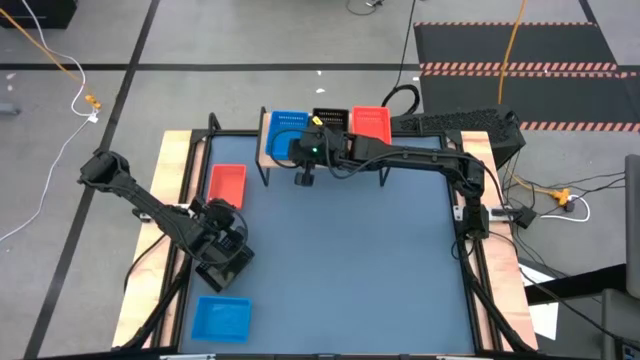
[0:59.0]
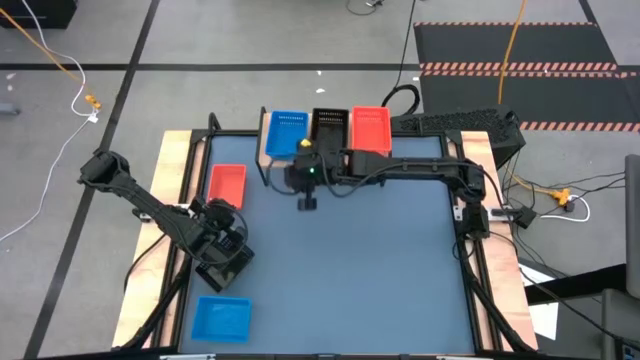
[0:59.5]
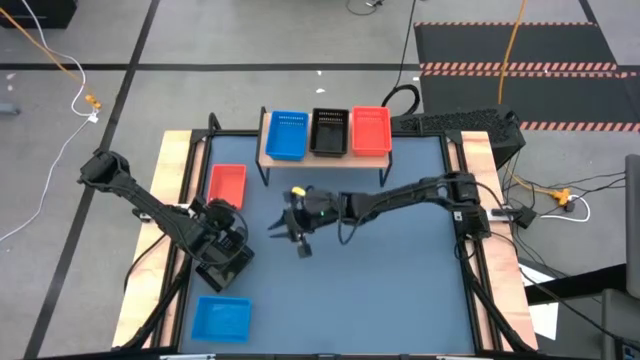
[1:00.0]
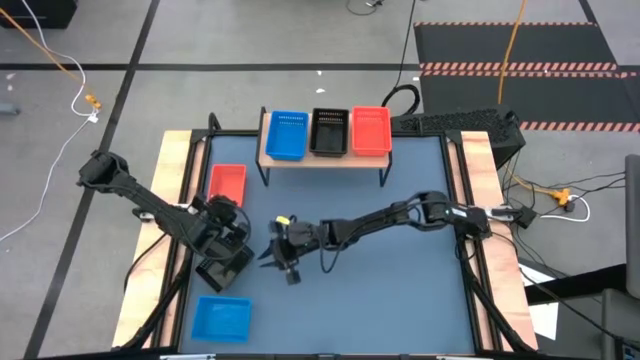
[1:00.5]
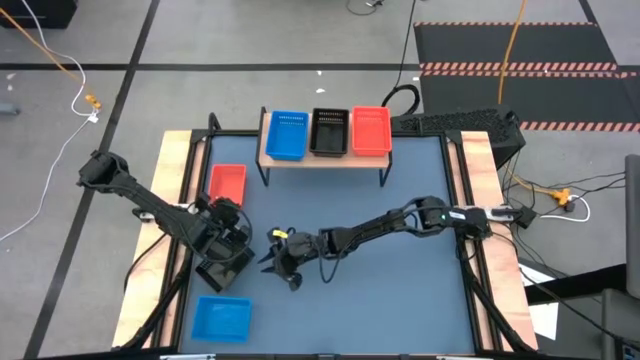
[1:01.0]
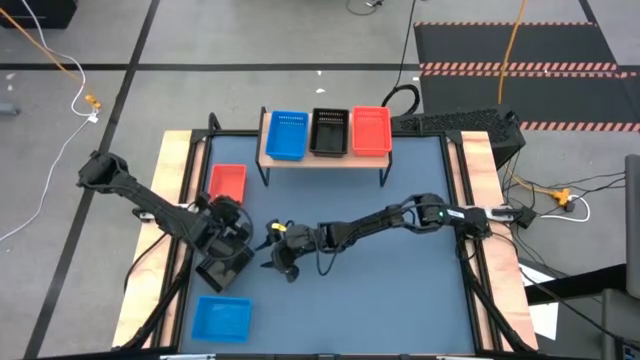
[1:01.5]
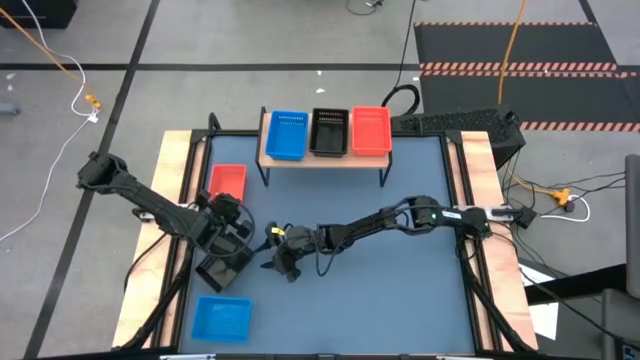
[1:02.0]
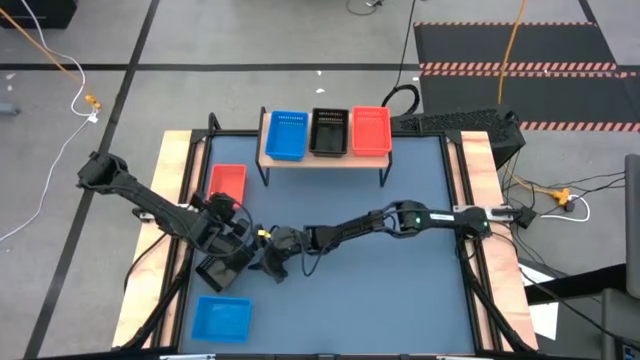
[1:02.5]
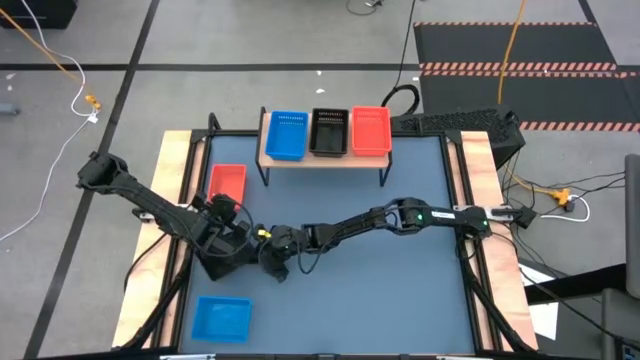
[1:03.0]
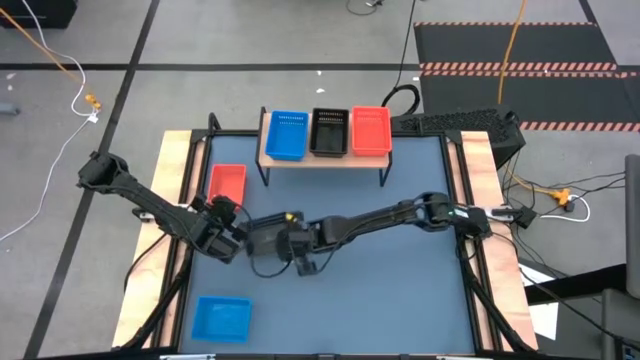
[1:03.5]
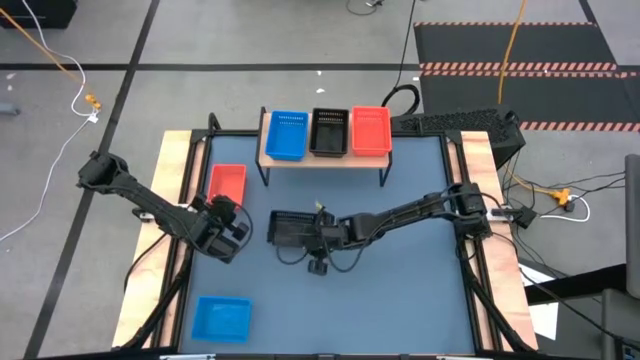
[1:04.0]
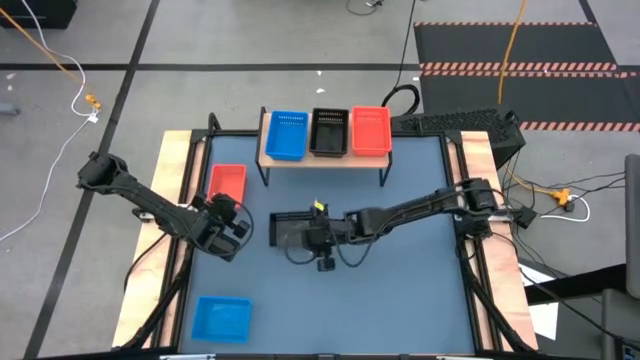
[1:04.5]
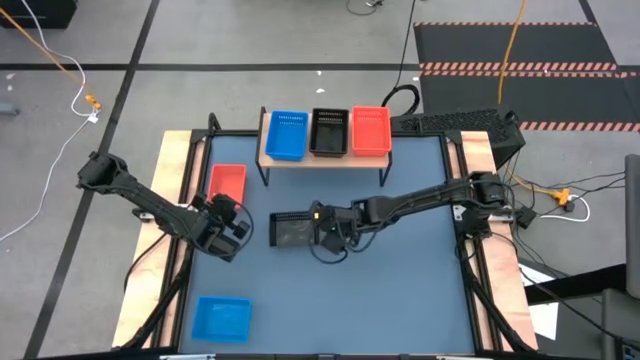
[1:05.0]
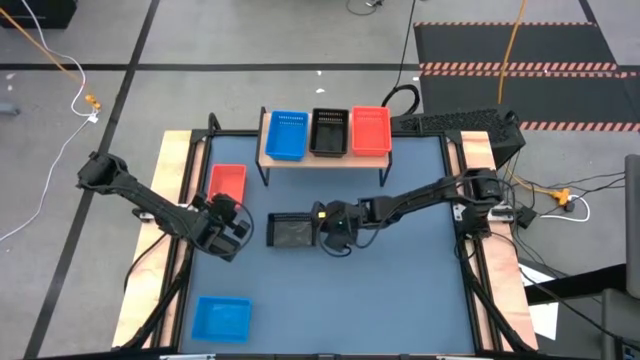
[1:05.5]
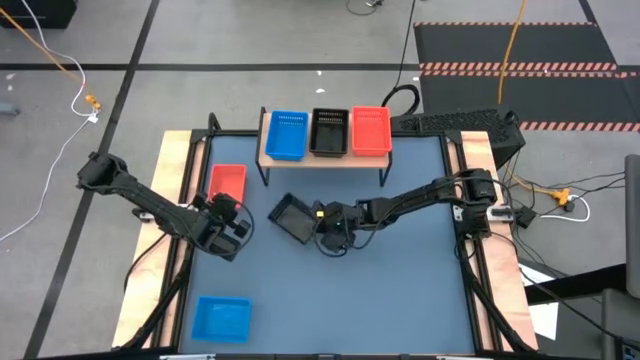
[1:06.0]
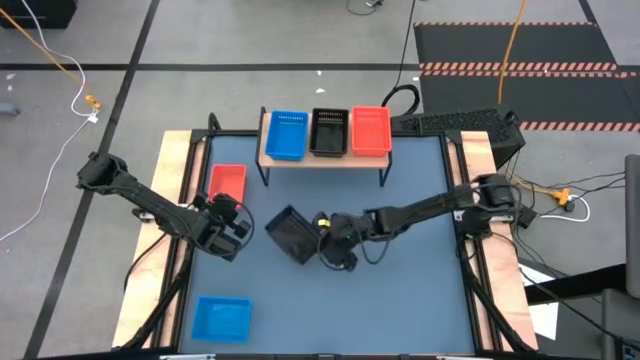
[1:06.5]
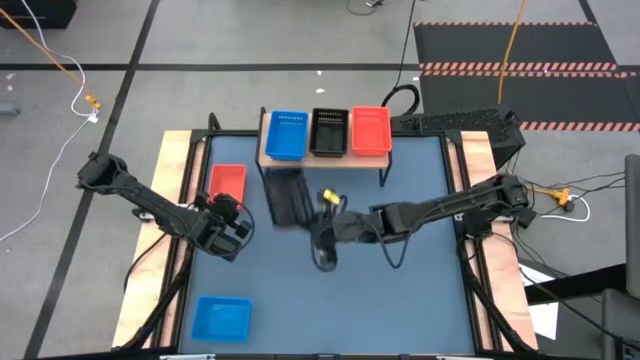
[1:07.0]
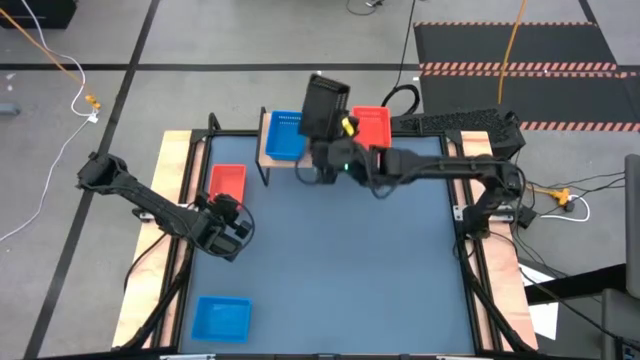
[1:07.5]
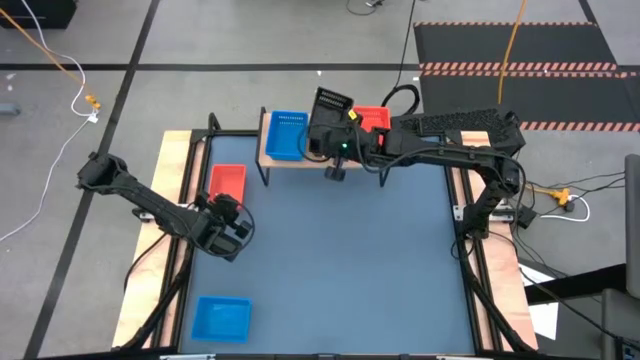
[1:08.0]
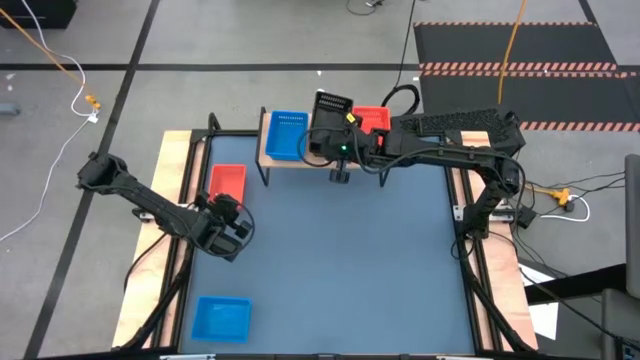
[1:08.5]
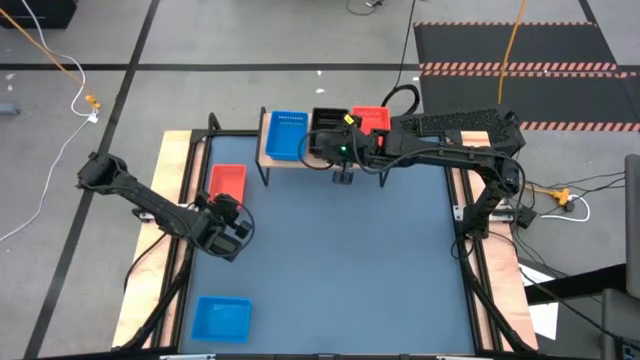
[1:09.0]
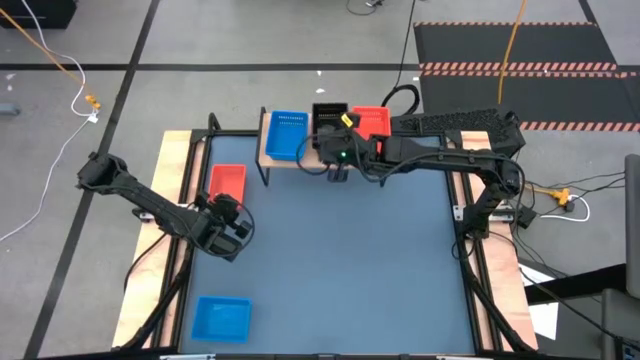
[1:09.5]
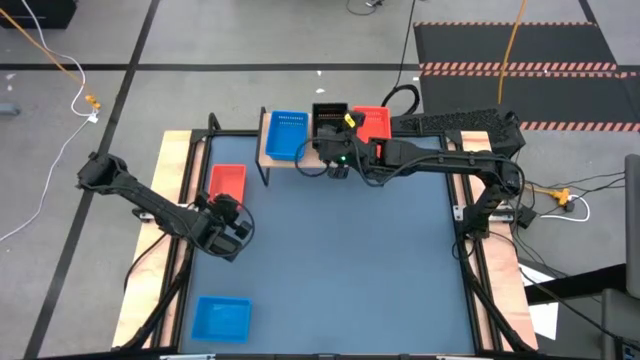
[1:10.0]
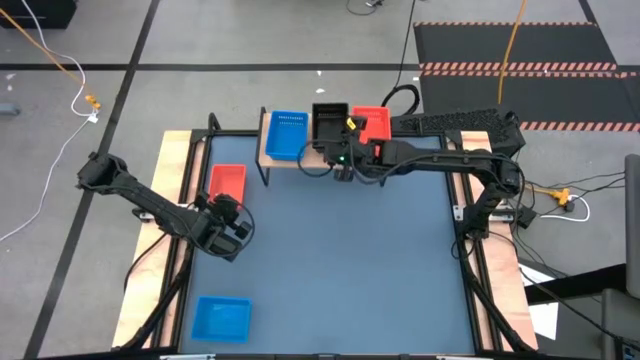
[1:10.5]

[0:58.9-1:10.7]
Task: Stack baskets on shelf by color
Stack the black bin on the stacked black bins on the shelf

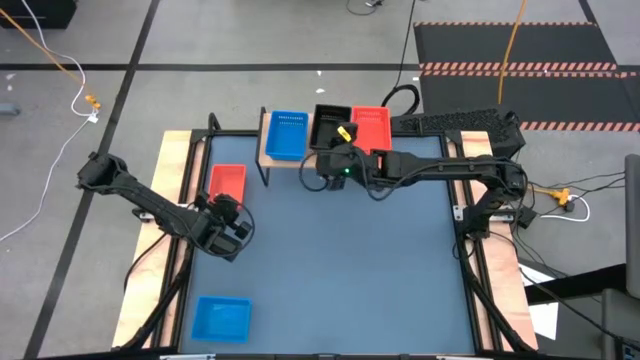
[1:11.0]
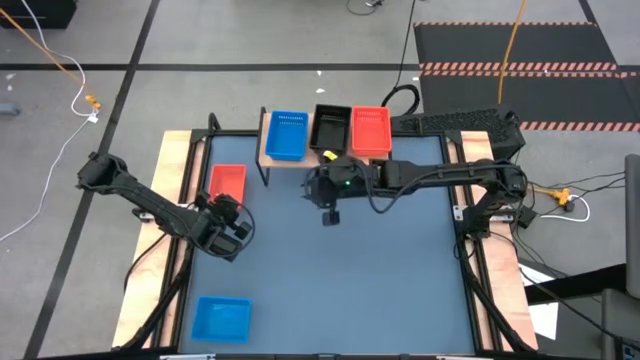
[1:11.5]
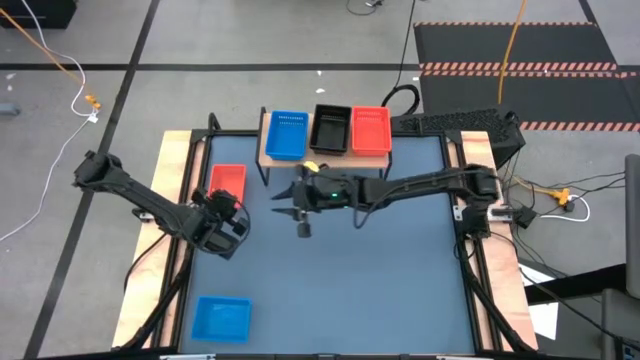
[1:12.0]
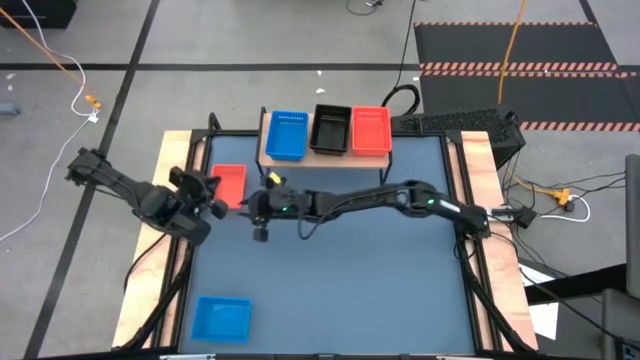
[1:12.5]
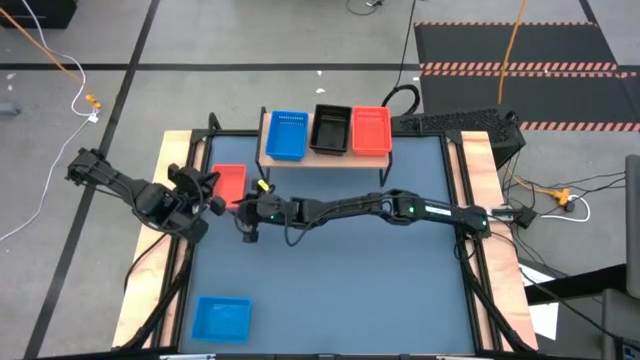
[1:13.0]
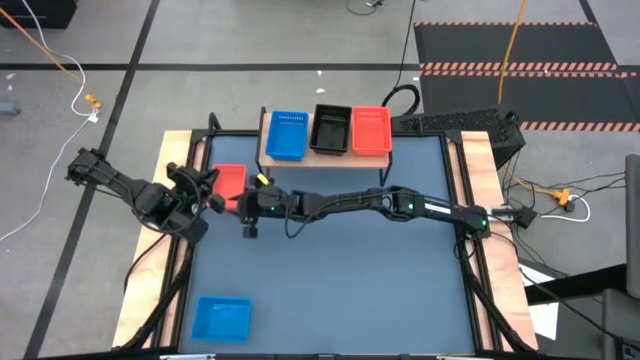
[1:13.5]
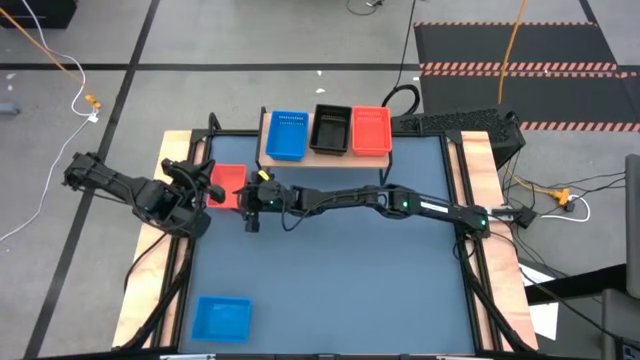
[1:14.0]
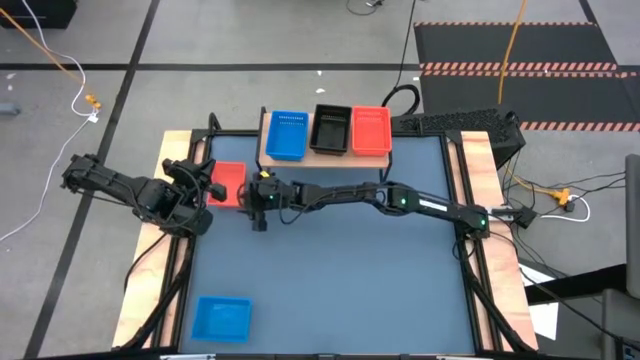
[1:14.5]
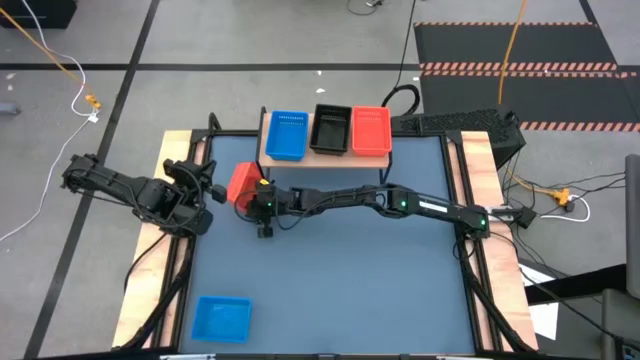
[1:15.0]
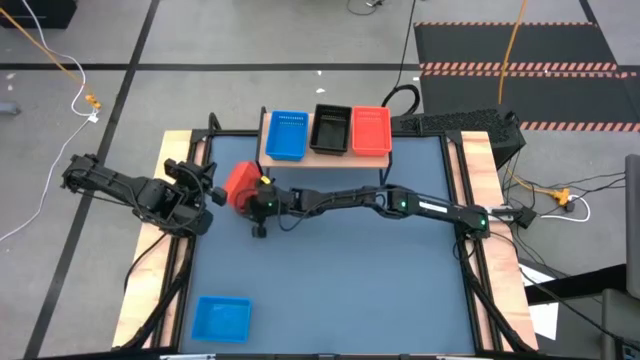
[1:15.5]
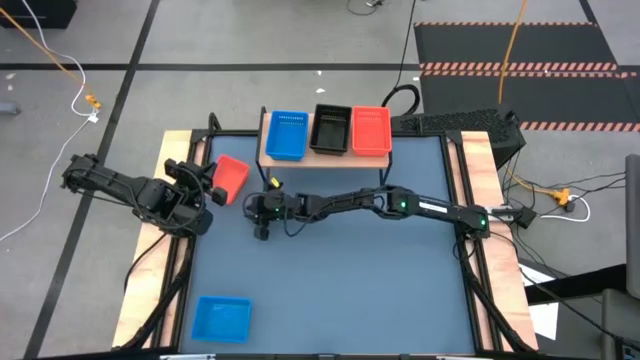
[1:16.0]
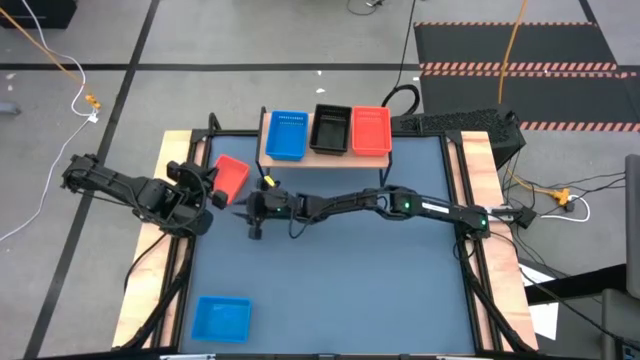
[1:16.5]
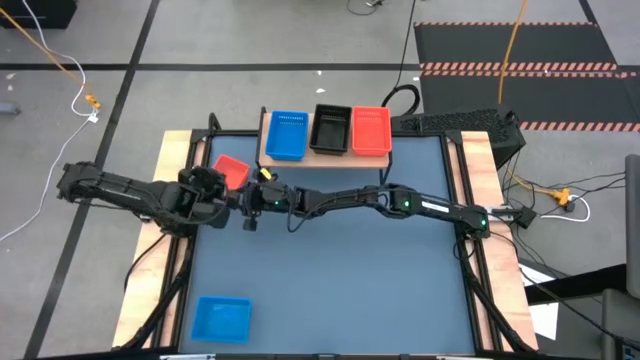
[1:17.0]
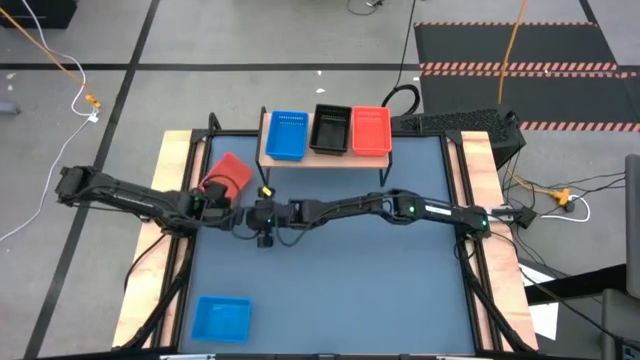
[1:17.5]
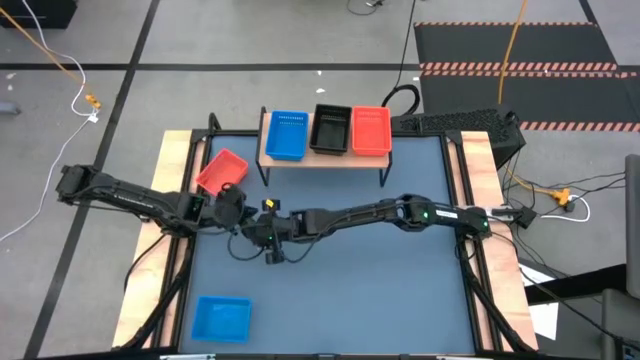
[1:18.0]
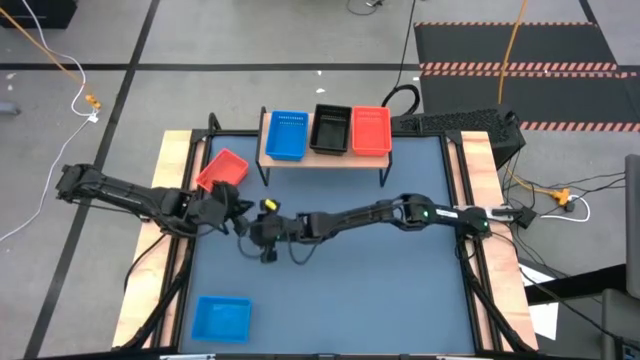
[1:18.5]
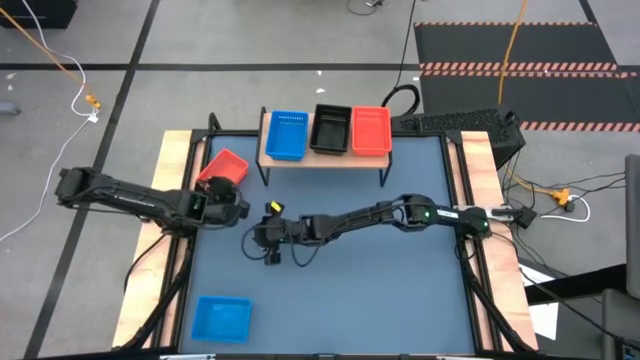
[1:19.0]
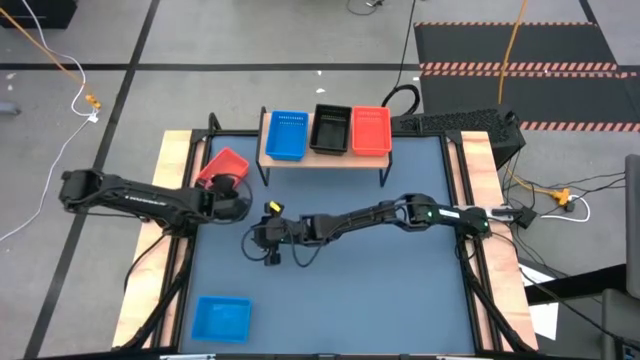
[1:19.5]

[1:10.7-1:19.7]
Stack the orange bin on the stacked orange bins on the shelf
